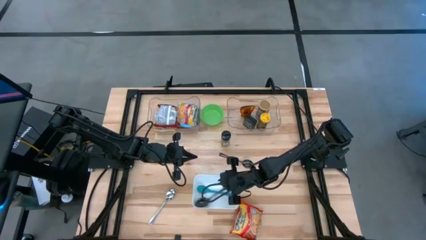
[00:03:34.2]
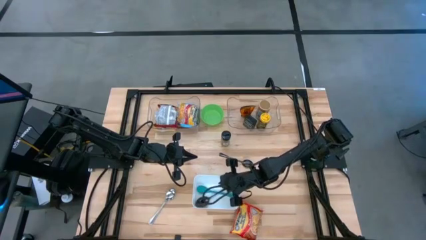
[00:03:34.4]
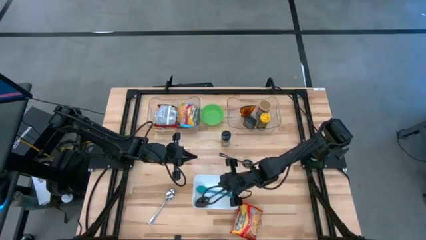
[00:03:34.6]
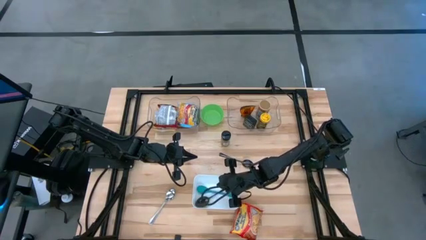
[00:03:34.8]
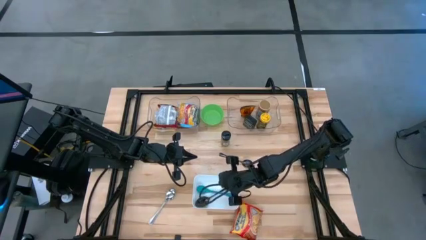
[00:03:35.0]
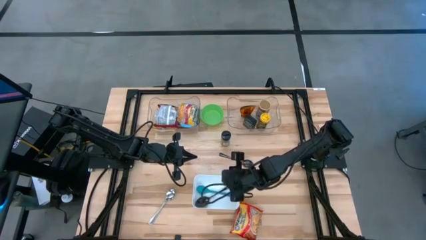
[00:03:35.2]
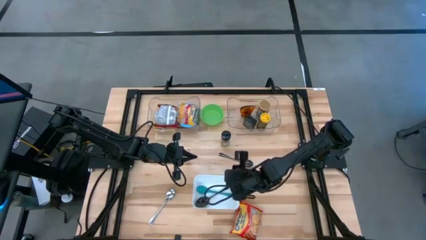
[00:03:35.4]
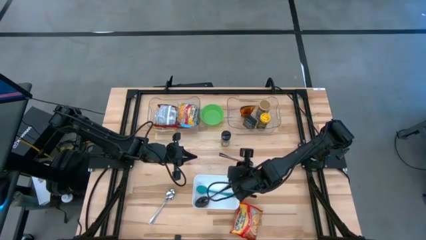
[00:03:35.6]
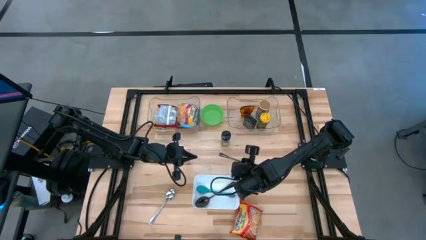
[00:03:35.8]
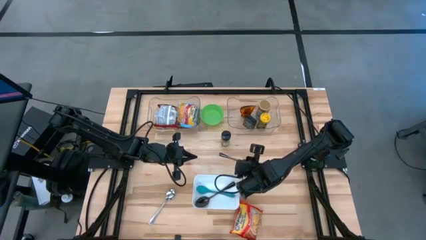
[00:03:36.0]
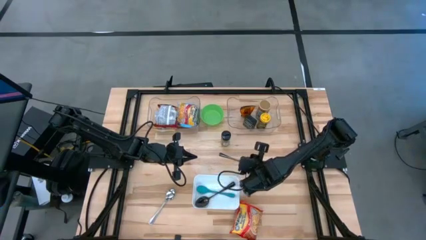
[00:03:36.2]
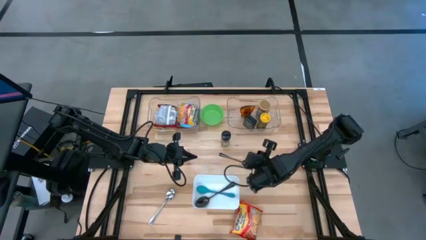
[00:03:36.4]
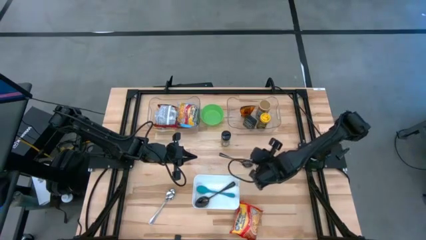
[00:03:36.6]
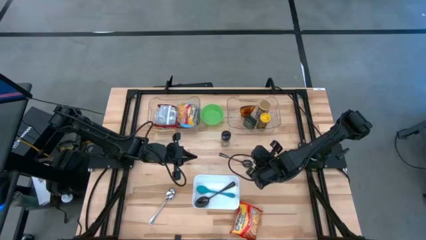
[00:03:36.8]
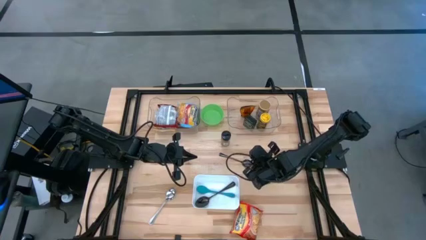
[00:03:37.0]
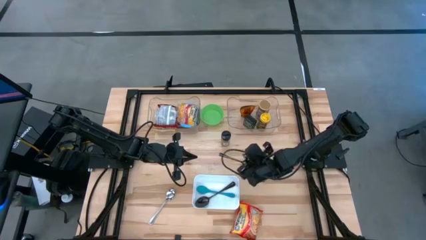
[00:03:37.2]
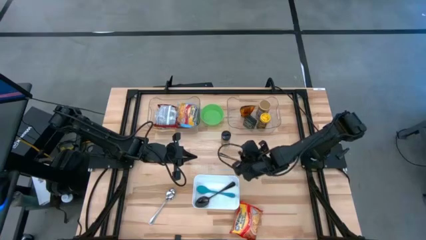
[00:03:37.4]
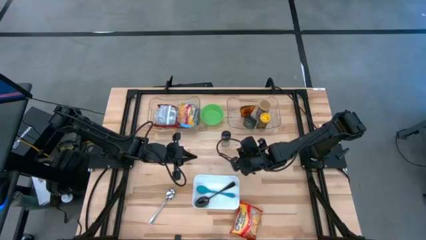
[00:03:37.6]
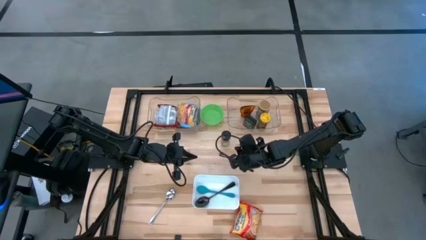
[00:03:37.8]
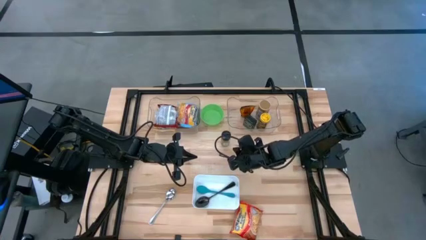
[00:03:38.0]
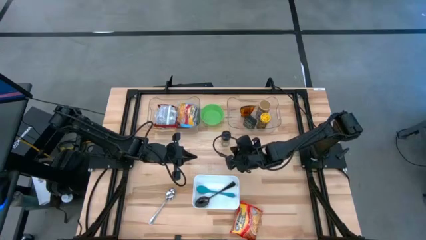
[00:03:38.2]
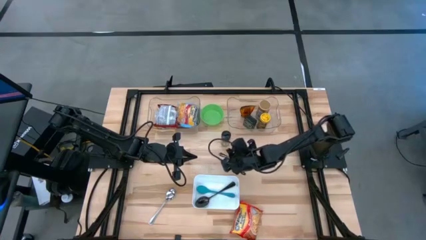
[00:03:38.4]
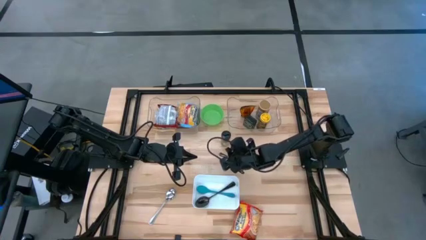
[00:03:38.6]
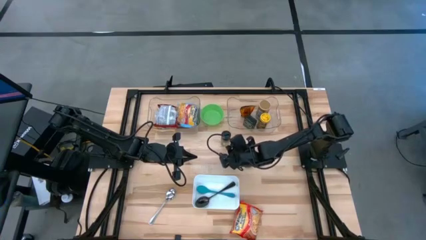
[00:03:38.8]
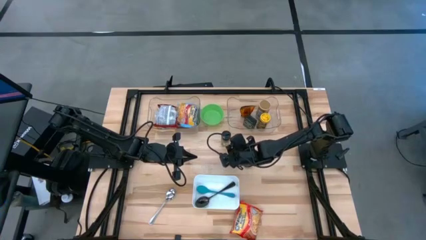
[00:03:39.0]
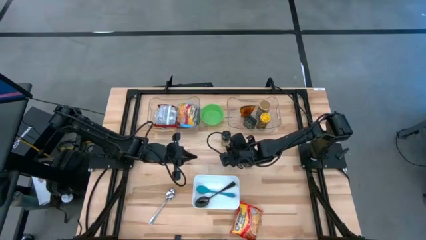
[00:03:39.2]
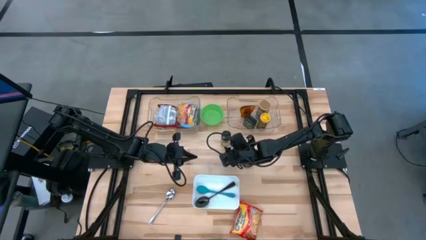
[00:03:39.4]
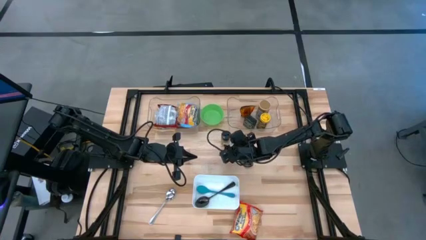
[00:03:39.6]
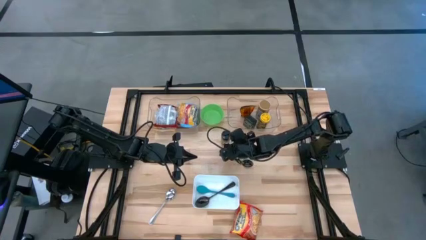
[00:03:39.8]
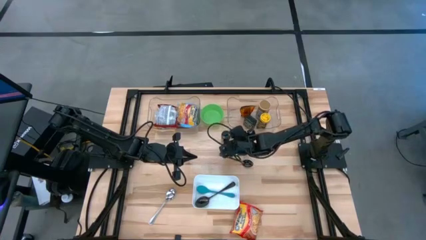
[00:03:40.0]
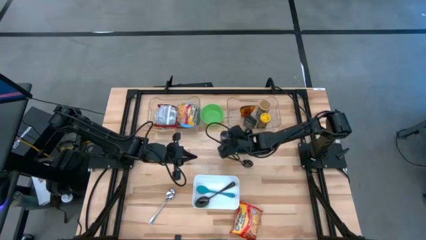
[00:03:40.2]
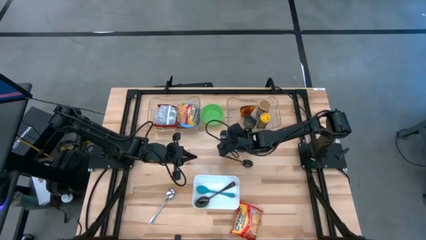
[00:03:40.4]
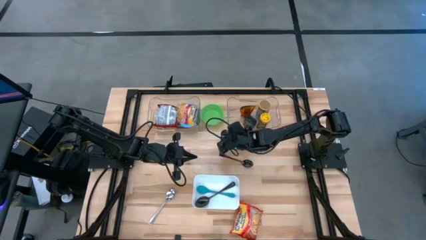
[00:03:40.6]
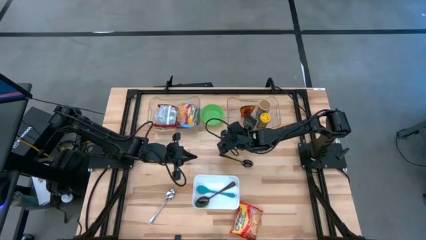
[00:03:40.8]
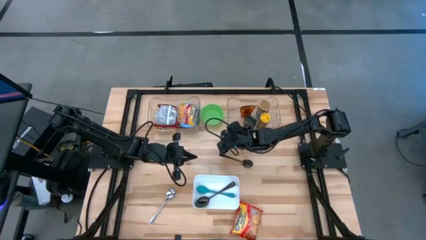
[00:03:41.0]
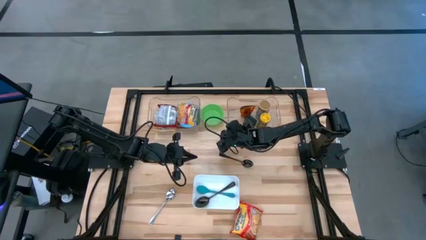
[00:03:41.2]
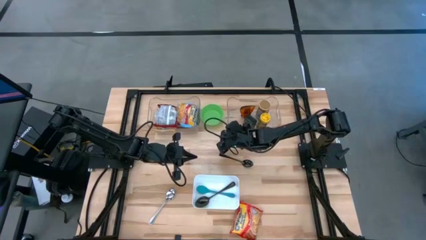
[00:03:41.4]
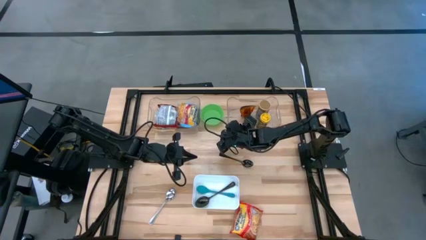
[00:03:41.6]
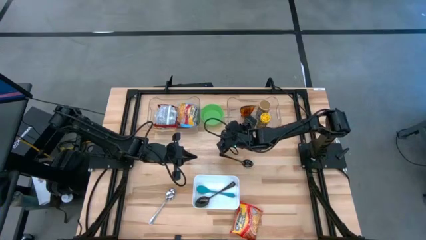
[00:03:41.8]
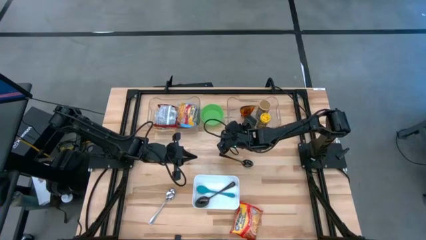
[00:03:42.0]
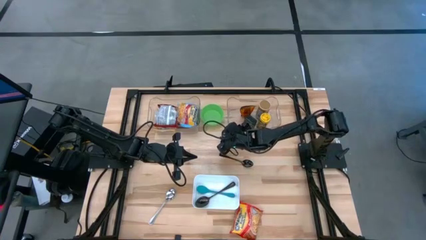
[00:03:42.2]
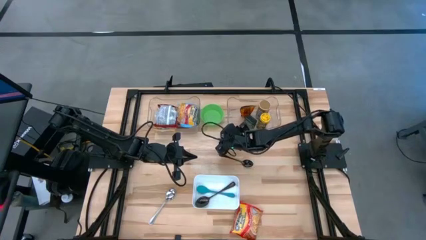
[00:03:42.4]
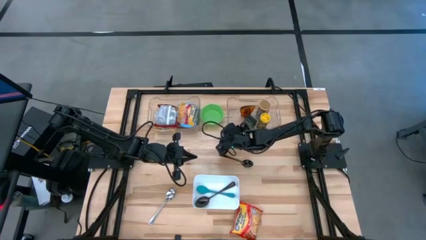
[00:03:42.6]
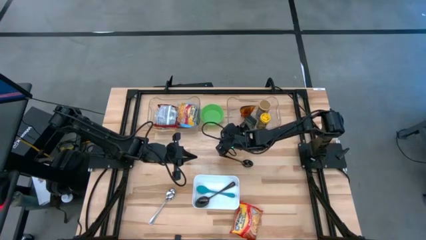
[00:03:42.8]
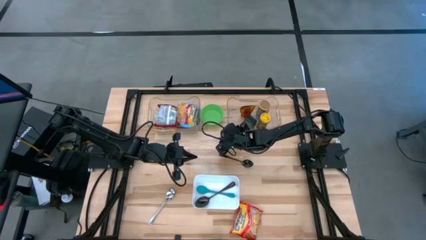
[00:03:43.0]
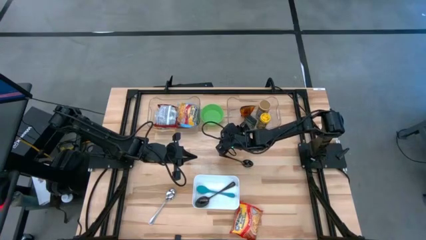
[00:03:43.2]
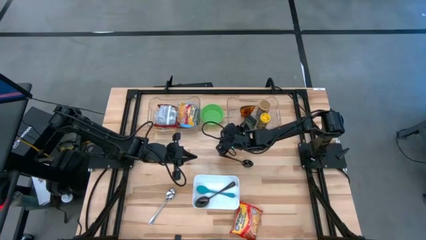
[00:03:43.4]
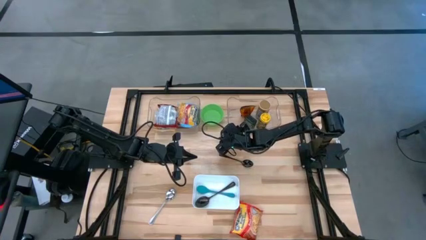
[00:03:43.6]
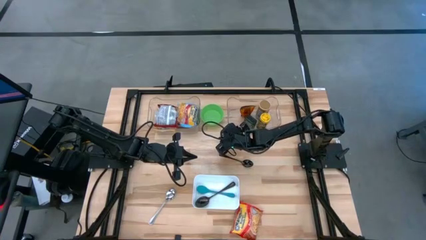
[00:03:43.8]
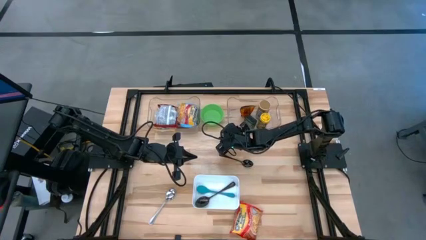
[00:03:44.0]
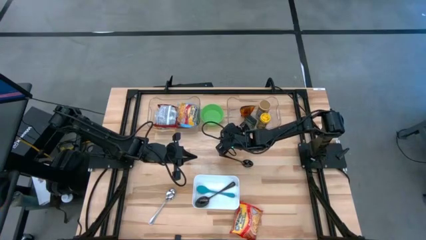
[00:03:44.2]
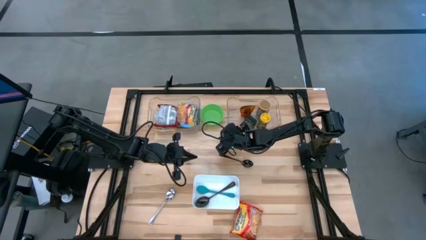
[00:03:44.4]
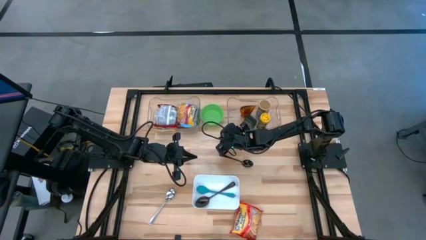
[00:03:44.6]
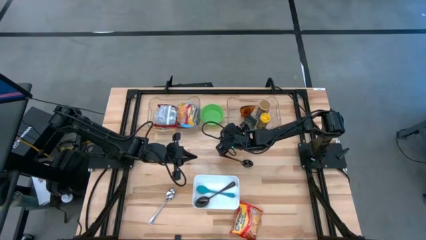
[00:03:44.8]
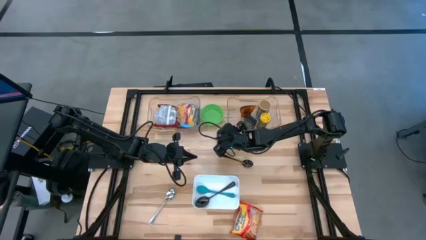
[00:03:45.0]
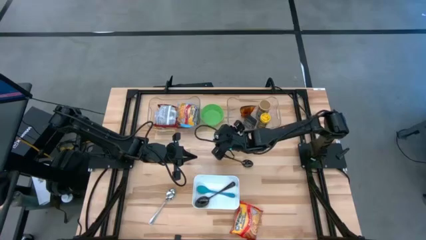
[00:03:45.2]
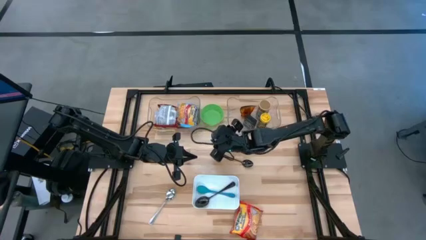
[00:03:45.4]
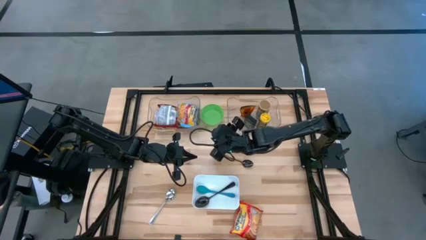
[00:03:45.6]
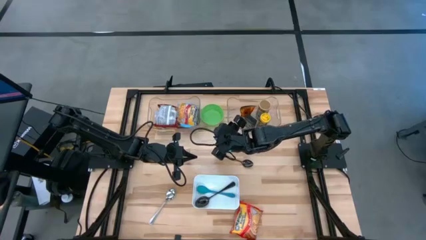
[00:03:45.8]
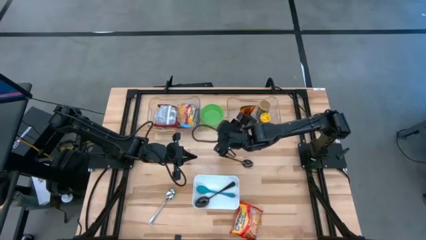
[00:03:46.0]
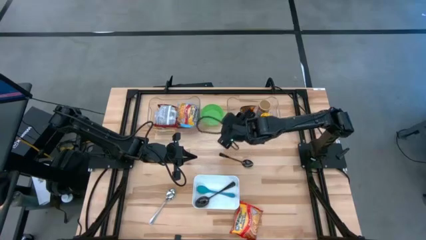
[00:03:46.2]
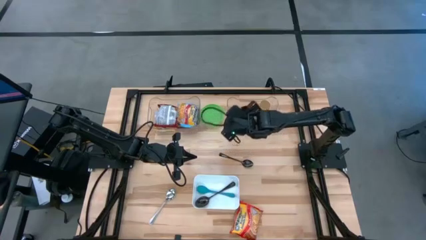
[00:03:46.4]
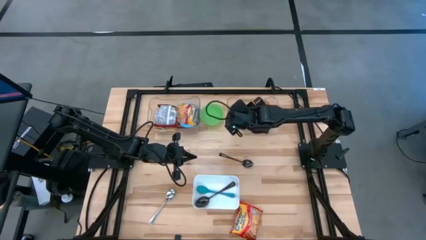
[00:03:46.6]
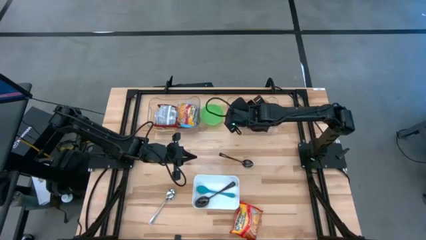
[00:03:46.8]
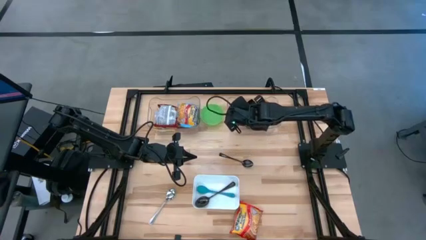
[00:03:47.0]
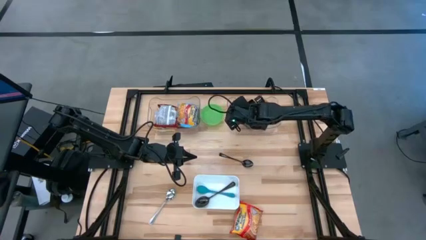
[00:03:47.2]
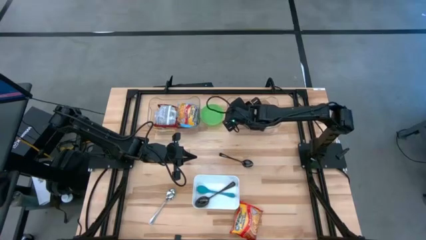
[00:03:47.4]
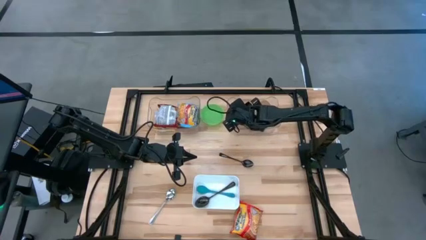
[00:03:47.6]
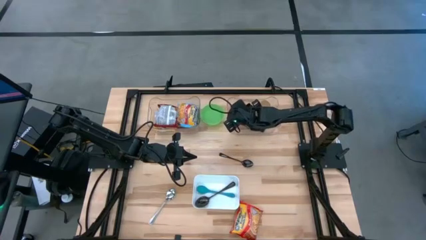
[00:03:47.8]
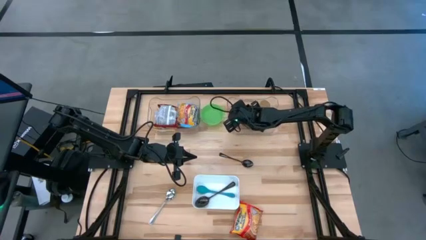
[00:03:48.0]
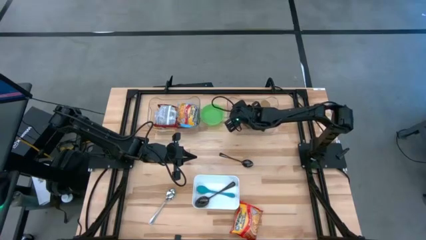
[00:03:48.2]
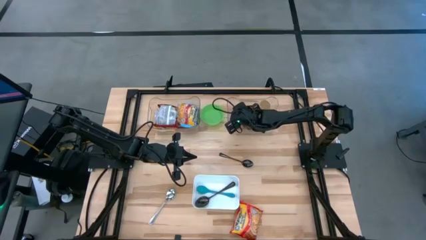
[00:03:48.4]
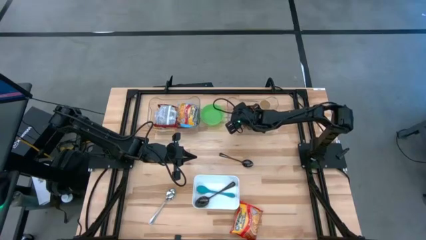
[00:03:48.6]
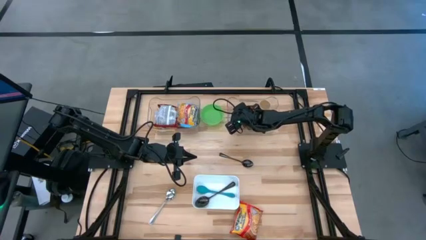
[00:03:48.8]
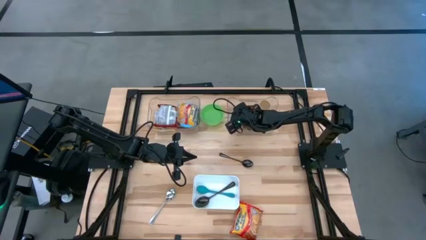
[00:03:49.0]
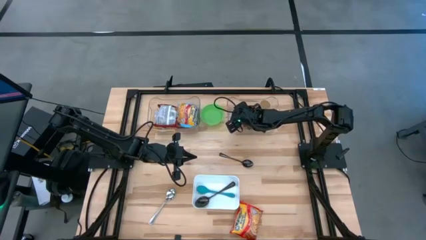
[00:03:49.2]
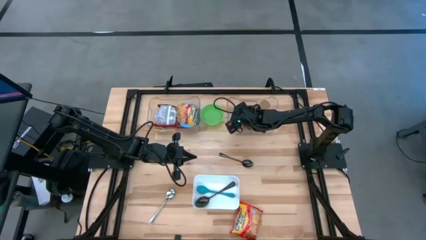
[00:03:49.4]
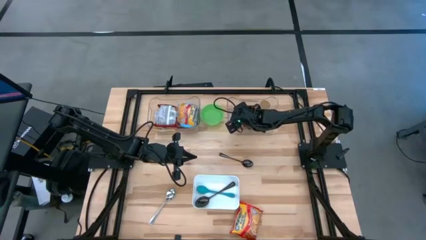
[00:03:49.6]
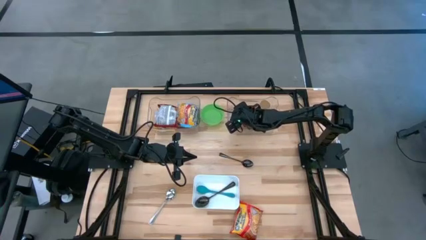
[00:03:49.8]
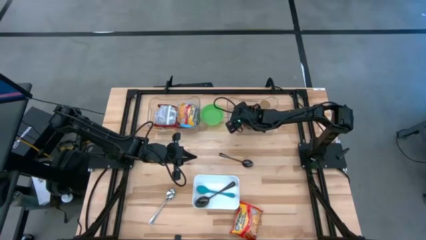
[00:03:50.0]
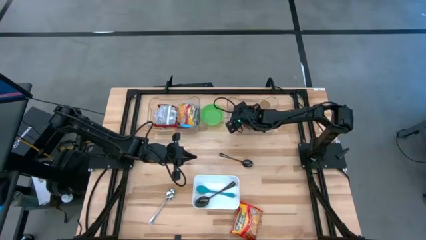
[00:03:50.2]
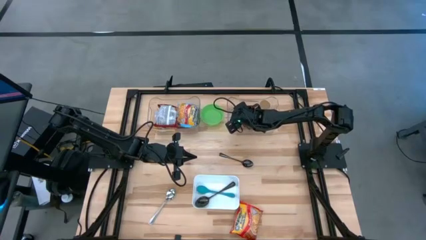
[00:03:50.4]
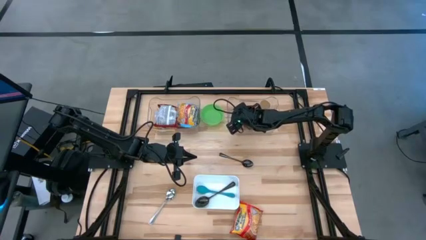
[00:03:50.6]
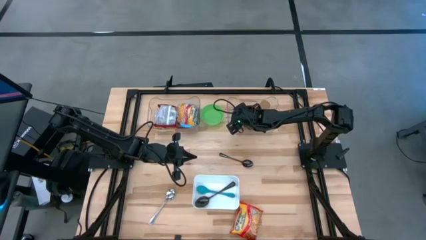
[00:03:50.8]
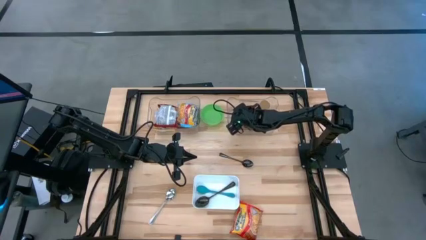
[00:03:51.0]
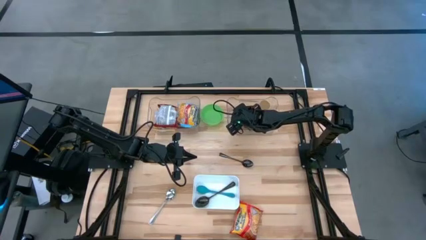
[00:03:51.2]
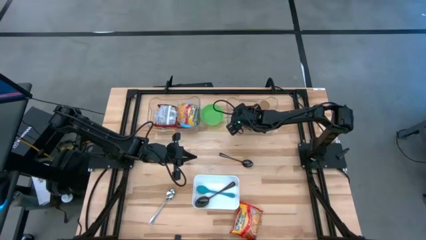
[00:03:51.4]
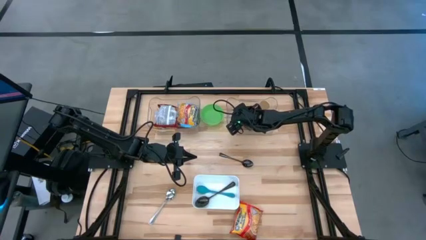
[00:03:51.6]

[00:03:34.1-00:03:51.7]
Task: Pick & Place Food Item
Put the black seasoning into the right transparent bin
